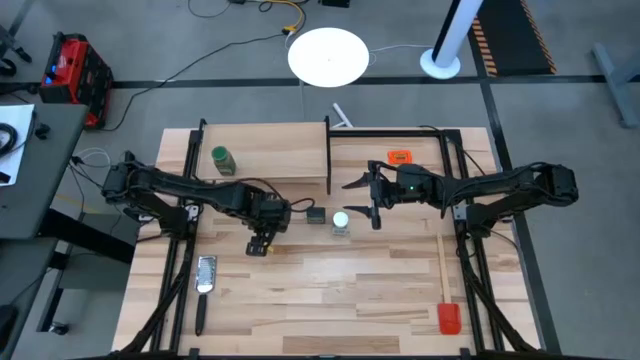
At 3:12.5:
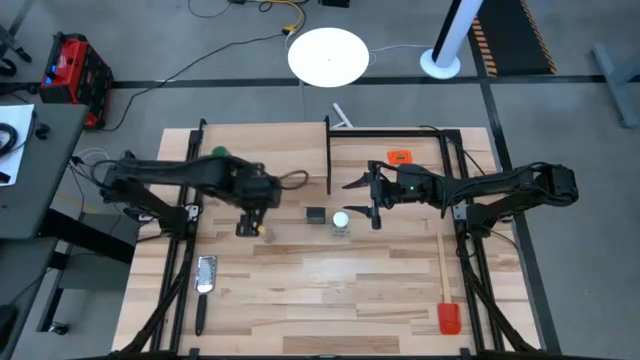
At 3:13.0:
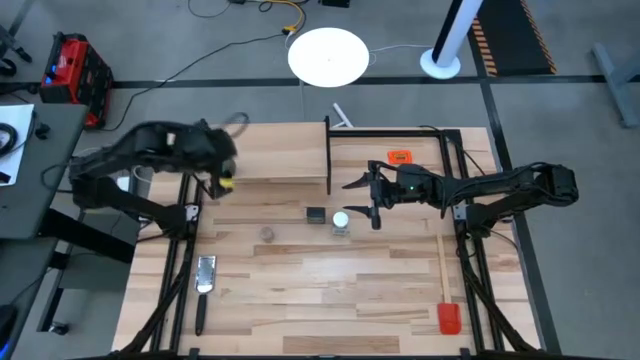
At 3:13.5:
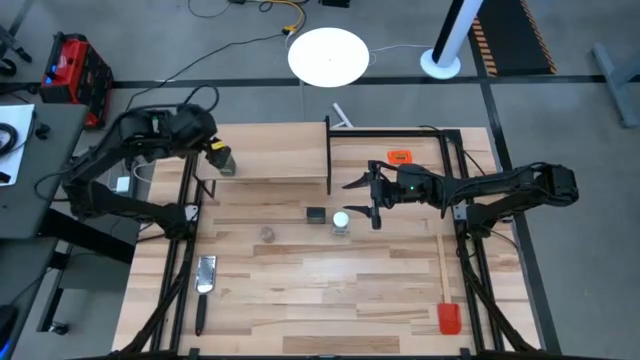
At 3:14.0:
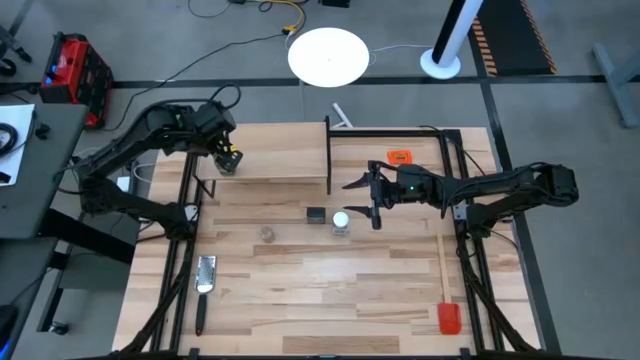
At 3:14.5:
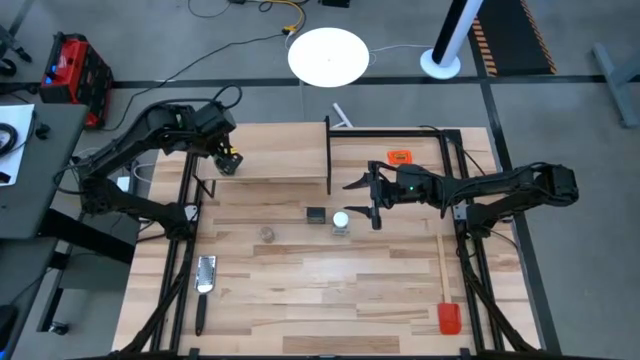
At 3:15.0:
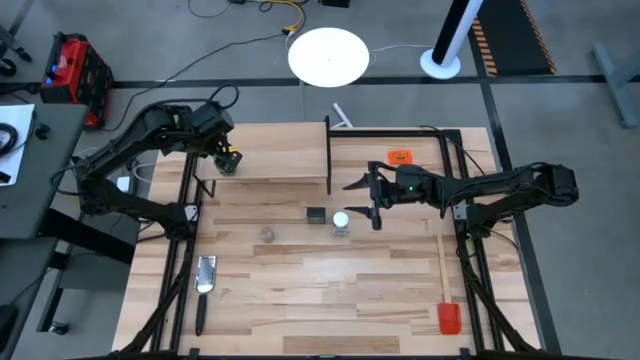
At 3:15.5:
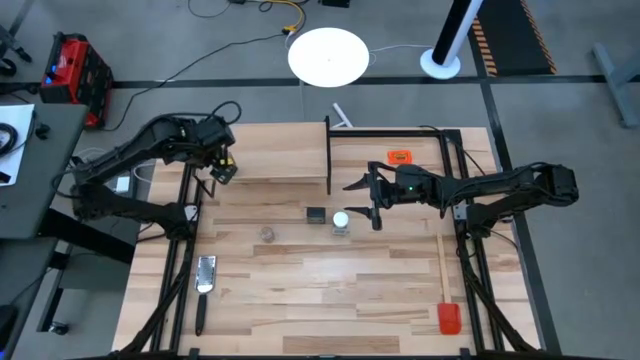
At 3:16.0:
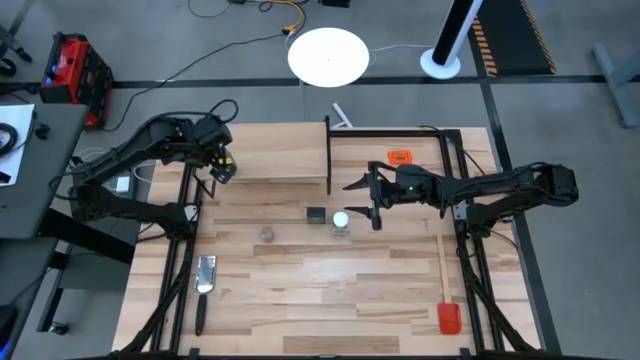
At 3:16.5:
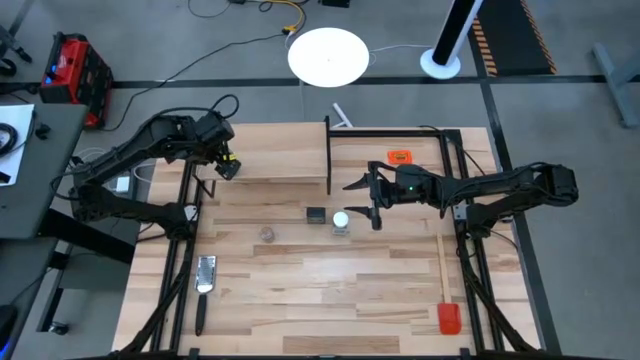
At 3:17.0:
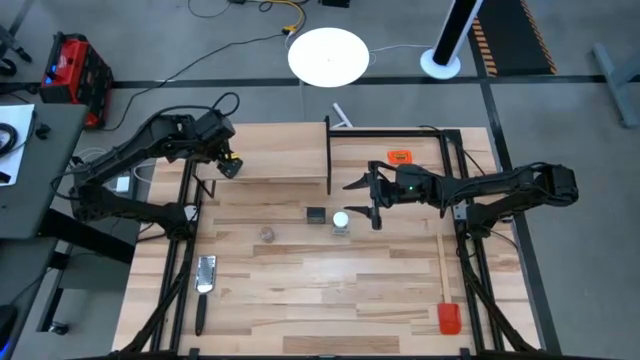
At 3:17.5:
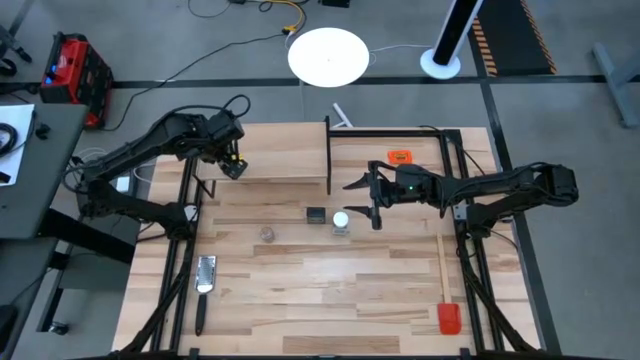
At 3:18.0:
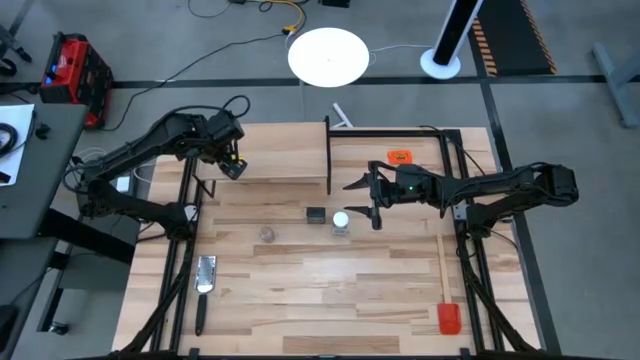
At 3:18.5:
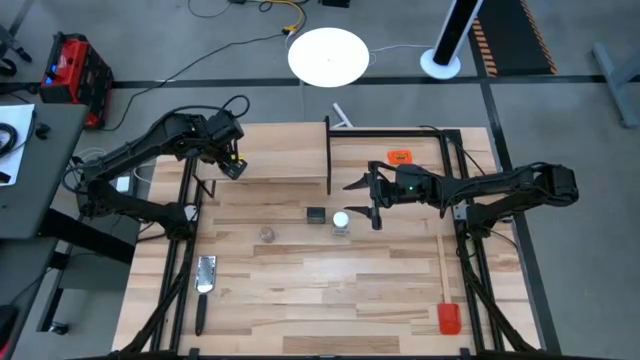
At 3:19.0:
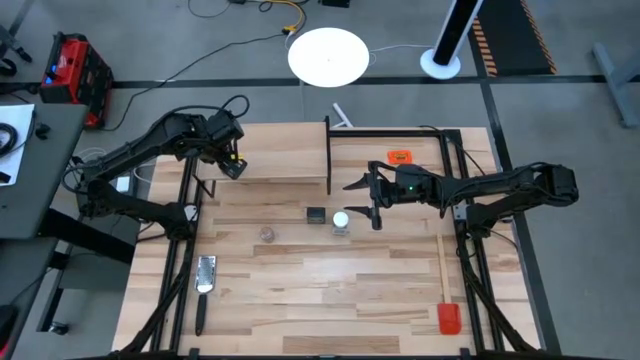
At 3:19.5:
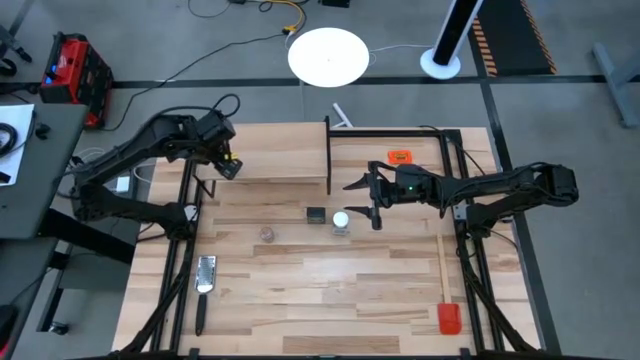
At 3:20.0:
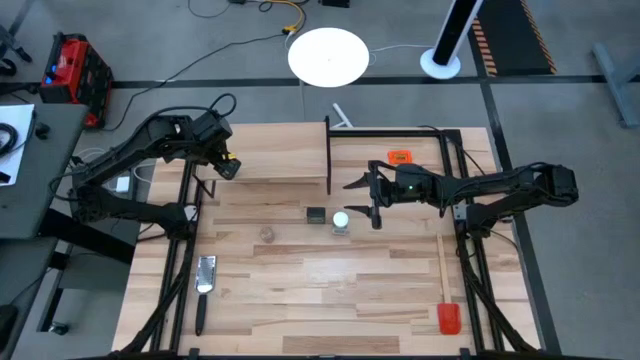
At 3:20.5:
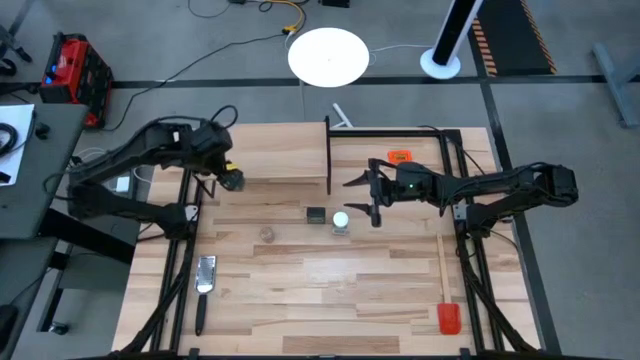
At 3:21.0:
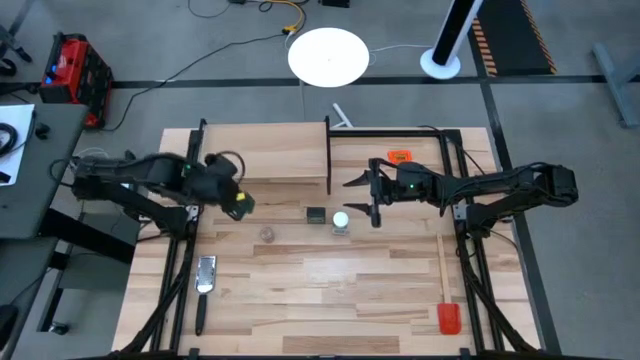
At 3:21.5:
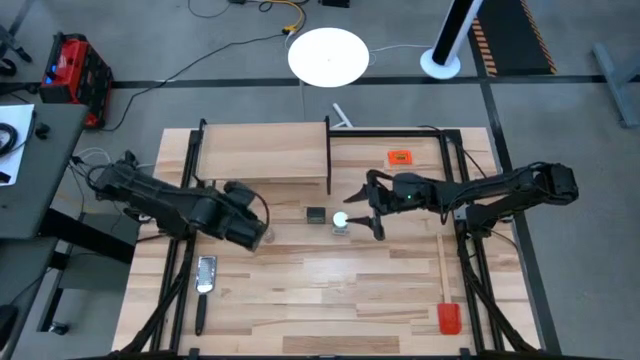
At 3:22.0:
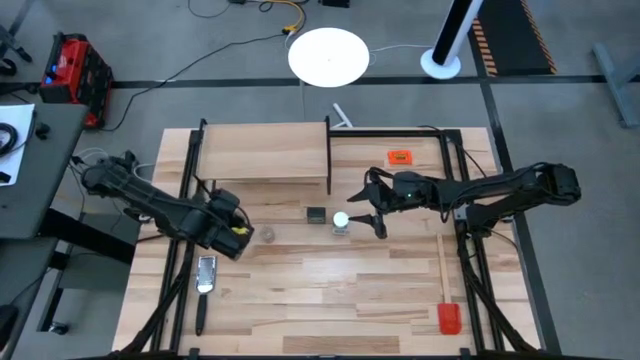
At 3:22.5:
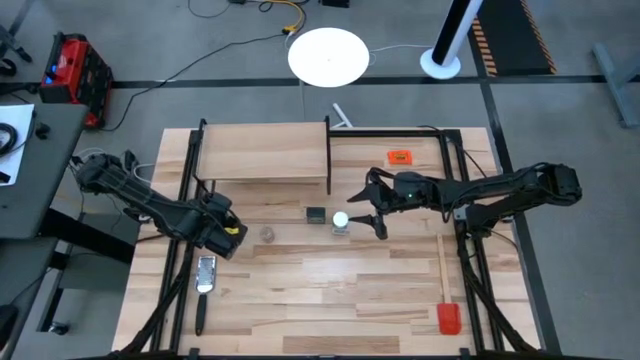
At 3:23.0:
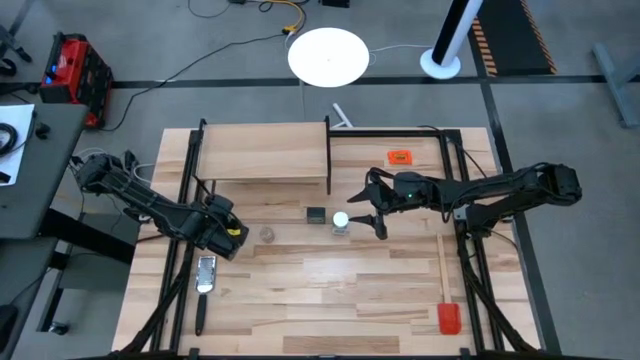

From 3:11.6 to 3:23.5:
Task: Shelf spices
Remove the green seasoning bottle from the shelf

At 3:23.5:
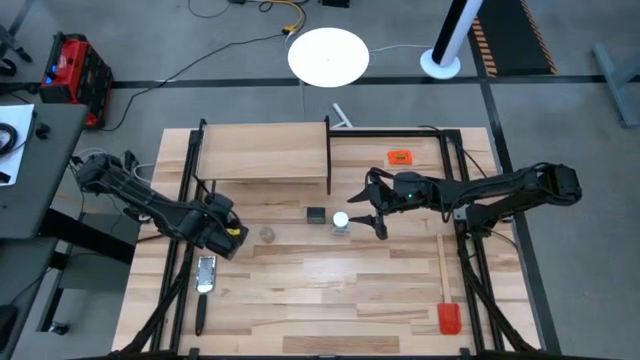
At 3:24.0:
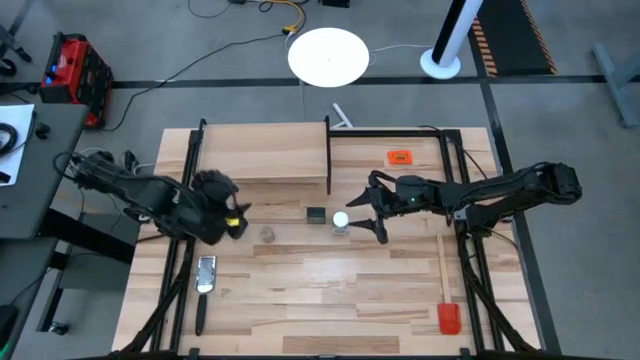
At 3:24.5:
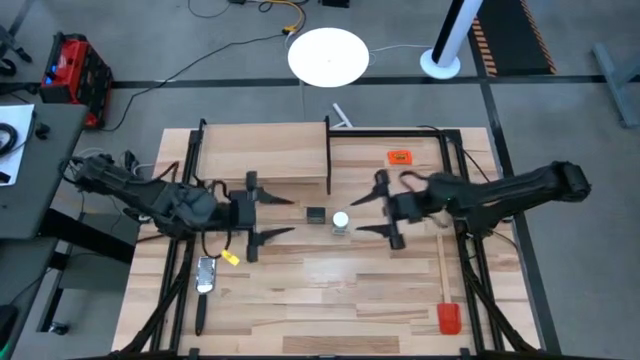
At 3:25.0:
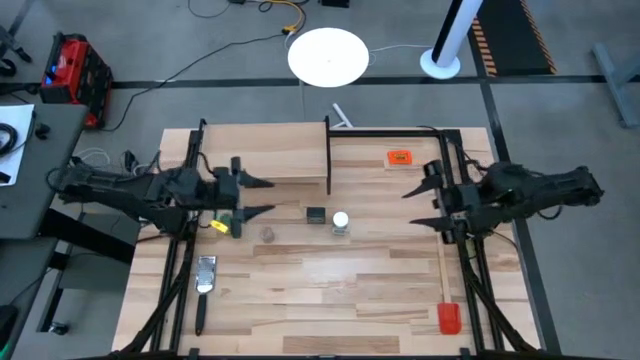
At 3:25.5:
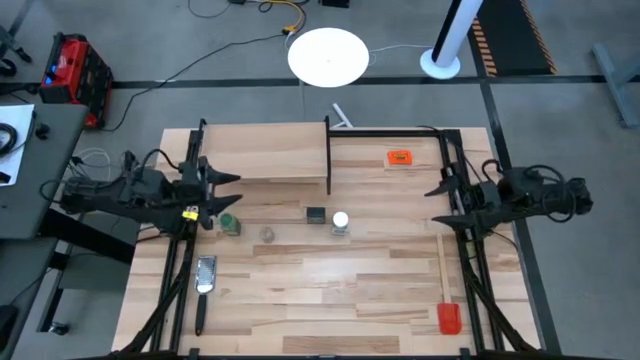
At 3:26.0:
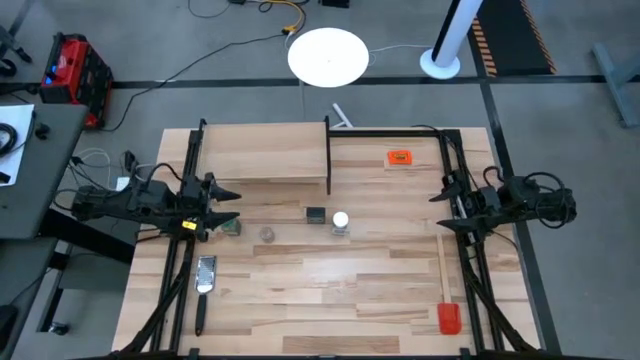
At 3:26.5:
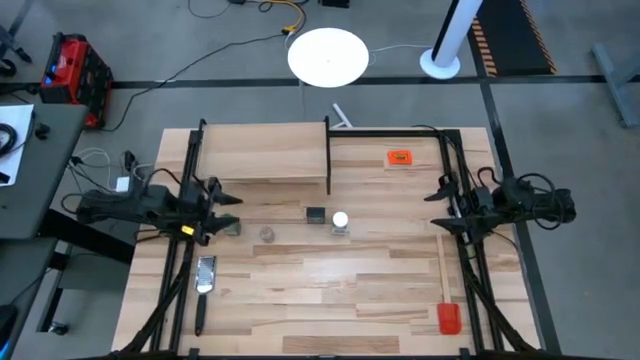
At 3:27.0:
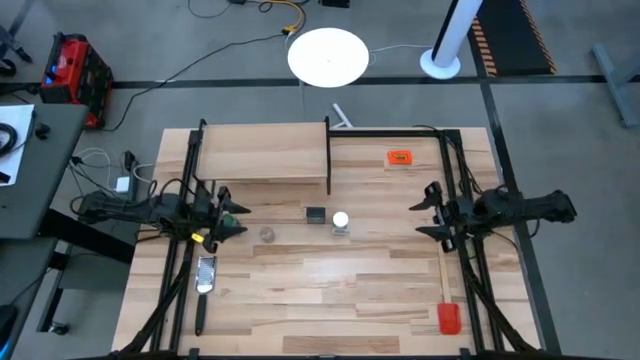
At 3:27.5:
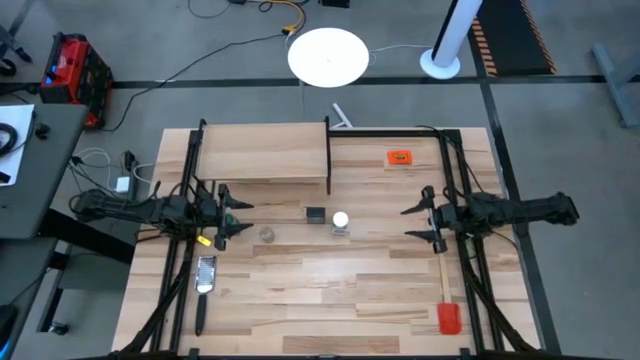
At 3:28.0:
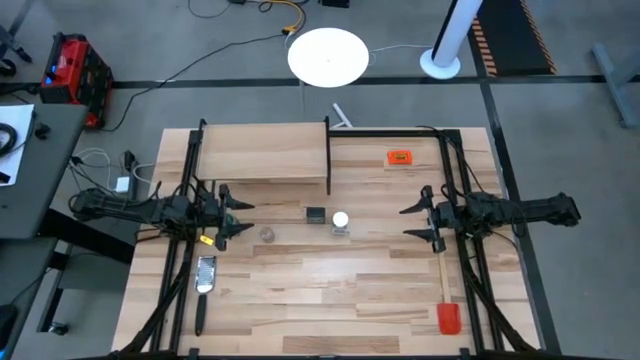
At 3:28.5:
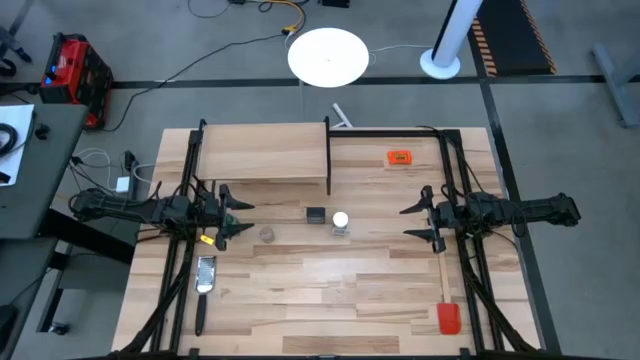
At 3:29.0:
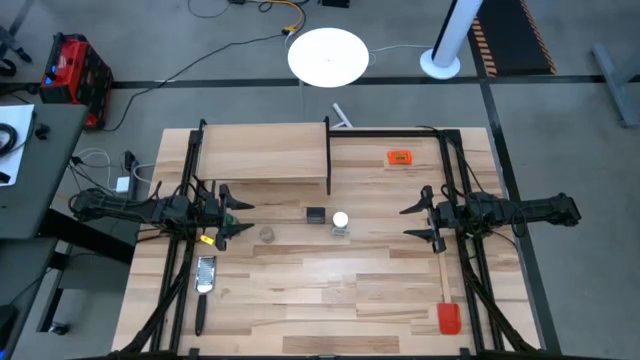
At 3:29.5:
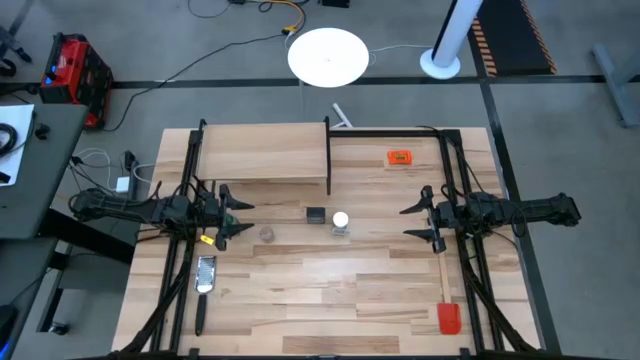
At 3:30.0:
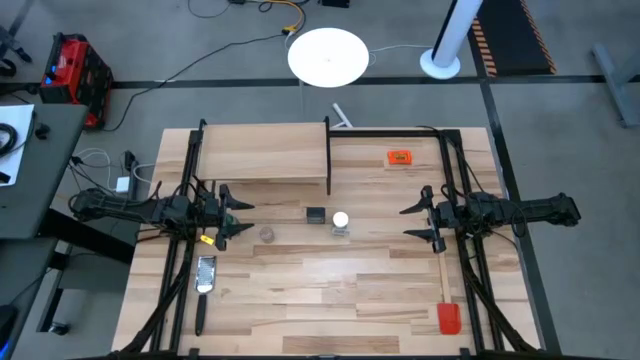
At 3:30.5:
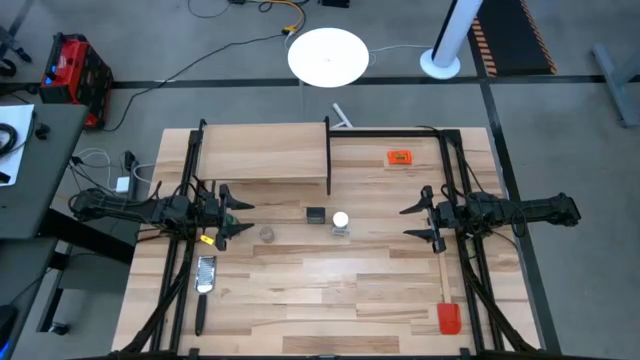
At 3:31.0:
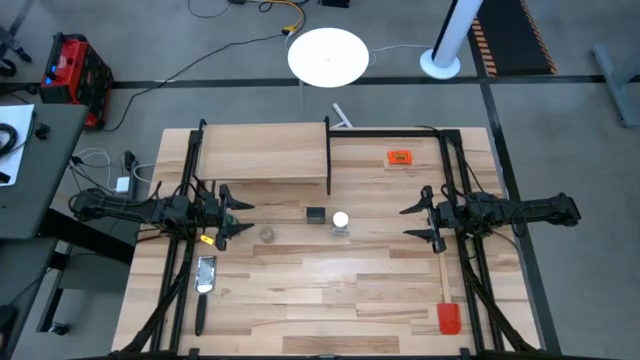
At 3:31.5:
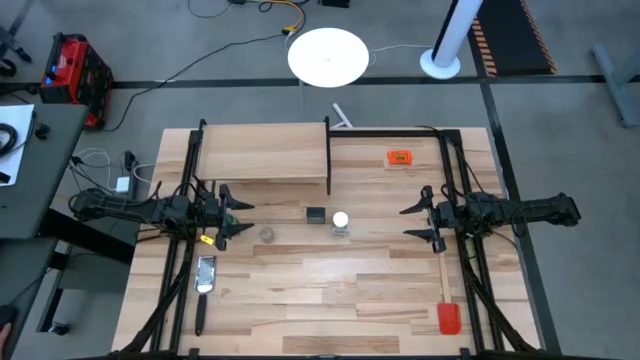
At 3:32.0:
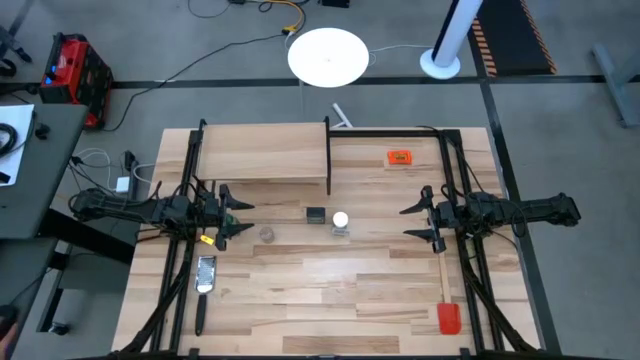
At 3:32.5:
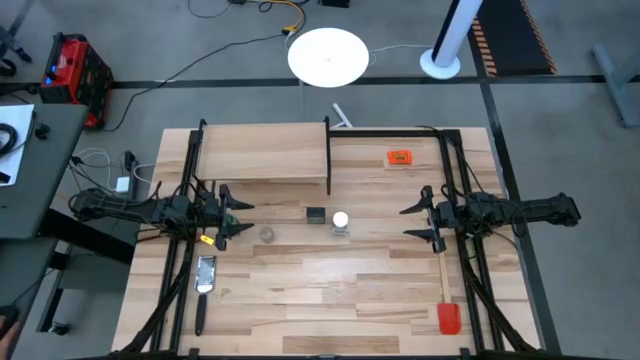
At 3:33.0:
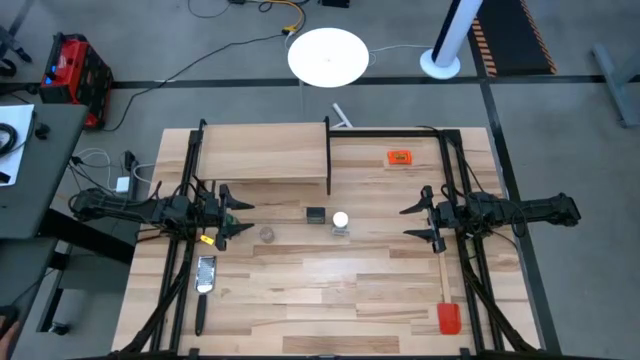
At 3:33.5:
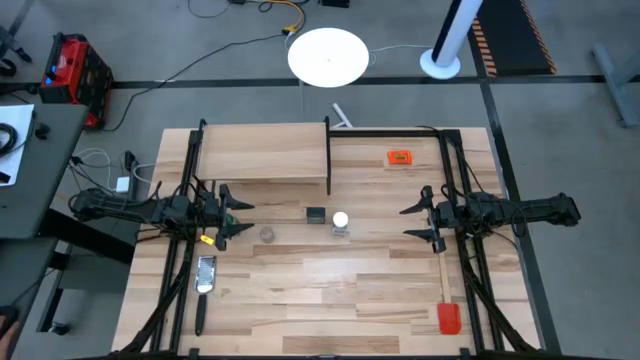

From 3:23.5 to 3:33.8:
Return to Home Position
